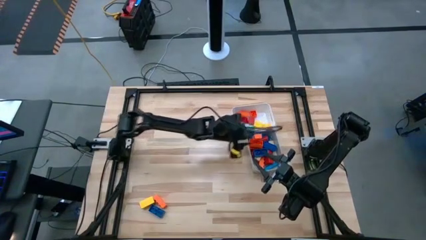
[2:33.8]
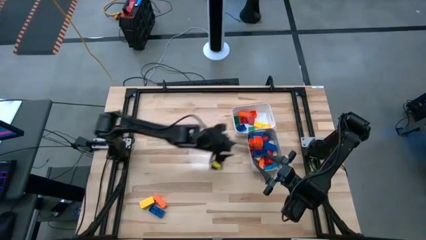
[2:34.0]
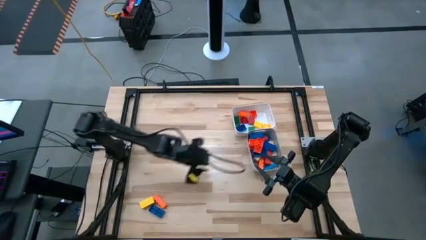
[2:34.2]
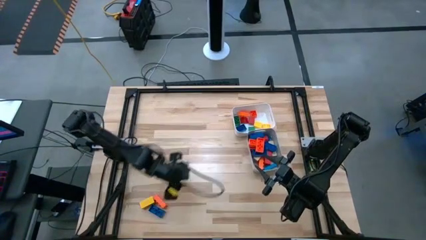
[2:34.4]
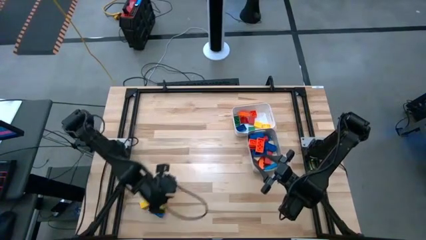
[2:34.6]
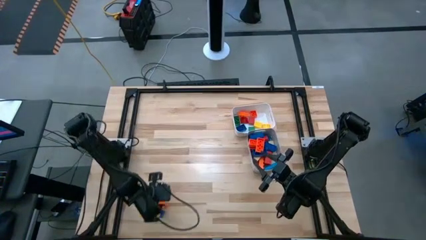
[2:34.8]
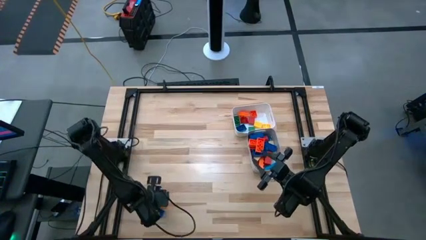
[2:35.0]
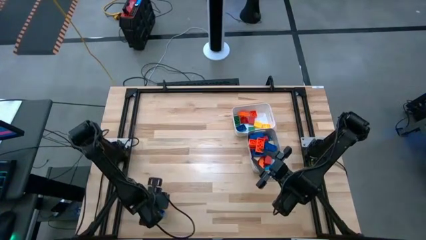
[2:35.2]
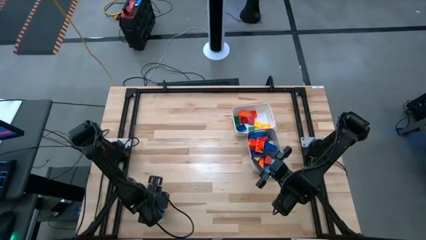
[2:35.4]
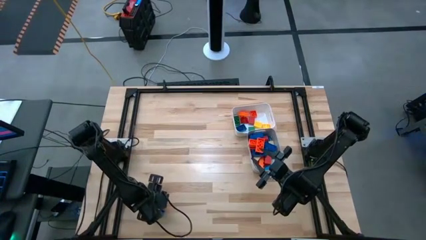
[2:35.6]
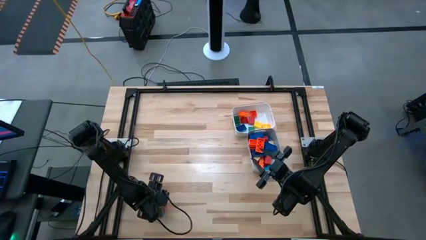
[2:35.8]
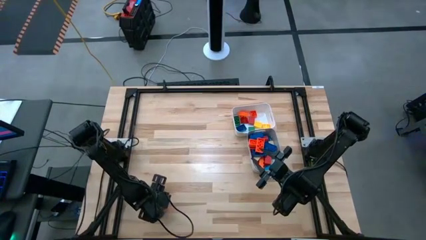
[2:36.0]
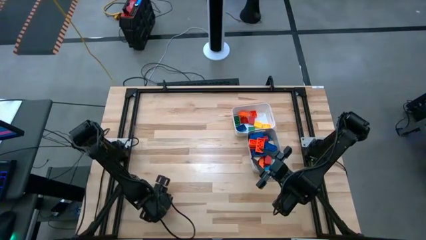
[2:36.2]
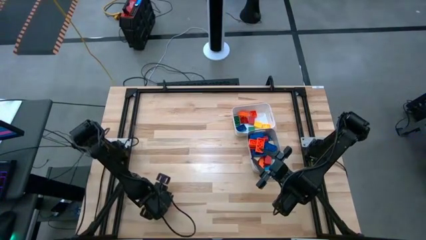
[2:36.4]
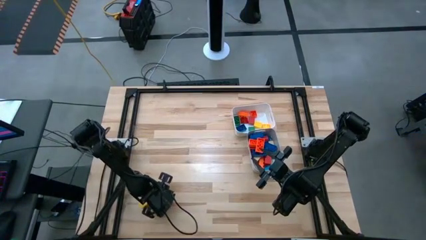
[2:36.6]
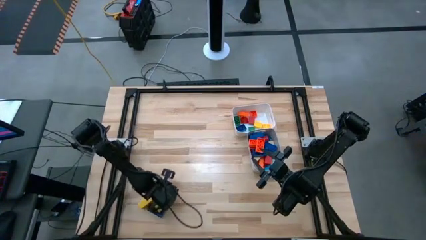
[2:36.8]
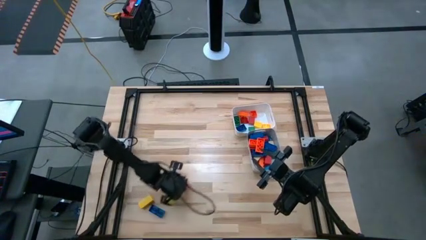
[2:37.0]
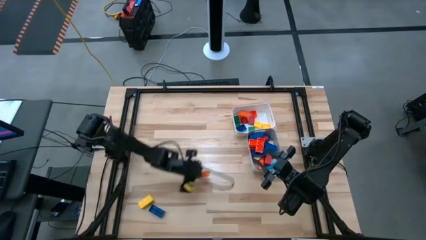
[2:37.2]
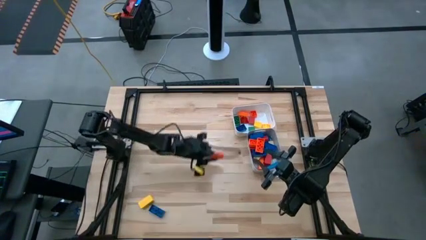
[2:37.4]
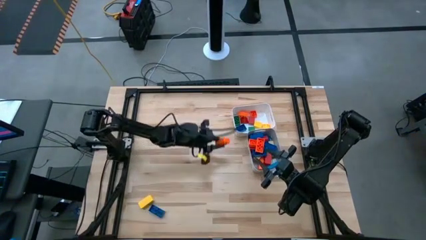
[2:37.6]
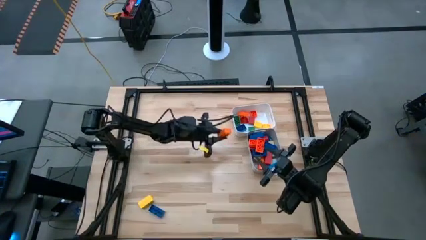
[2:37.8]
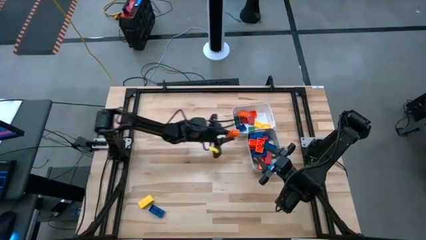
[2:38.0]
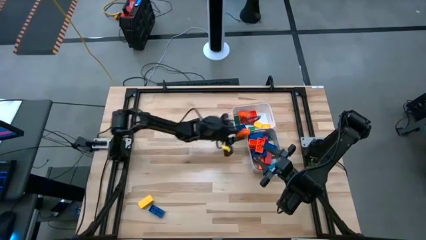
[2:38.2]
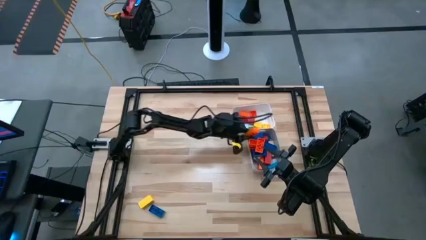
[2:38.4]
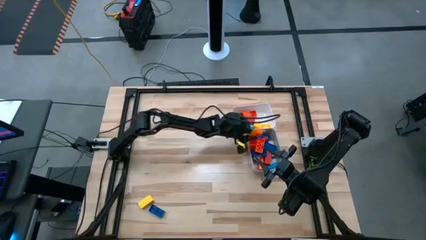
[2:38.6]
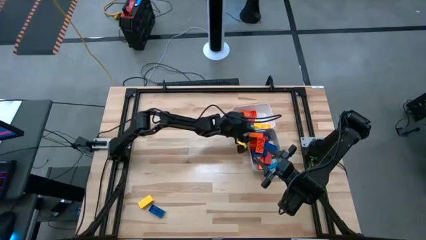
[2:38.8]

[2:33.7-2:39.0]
Task: Sort blocks by size
Put the large orange game piece into the gray bin

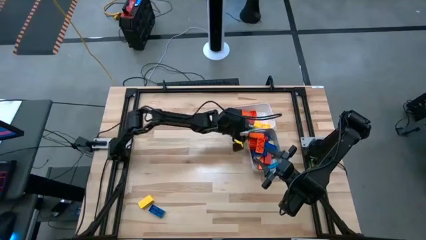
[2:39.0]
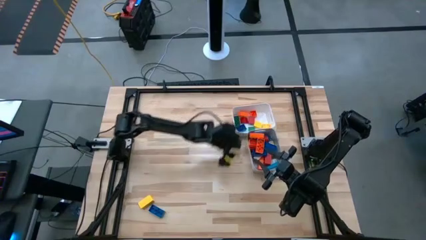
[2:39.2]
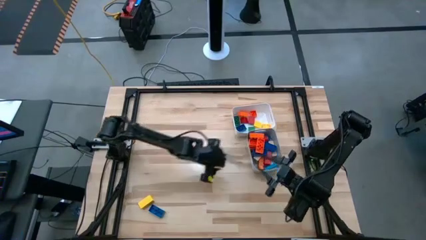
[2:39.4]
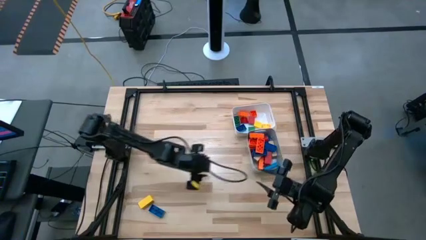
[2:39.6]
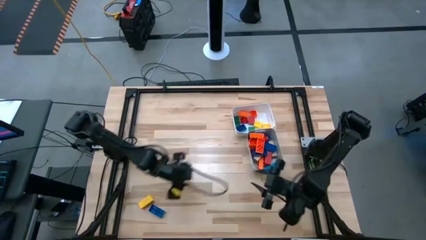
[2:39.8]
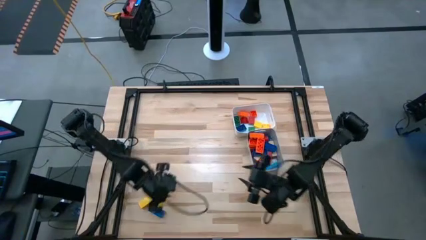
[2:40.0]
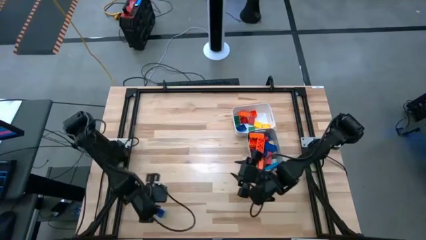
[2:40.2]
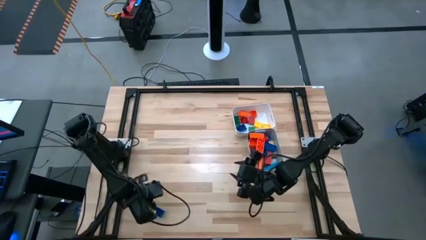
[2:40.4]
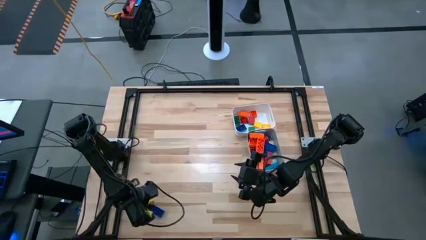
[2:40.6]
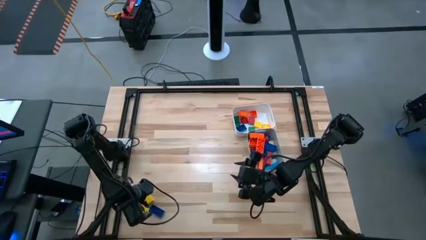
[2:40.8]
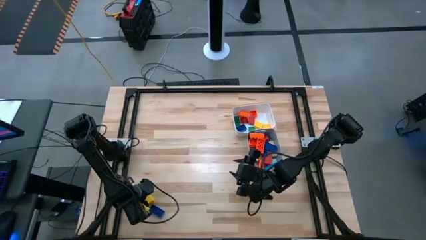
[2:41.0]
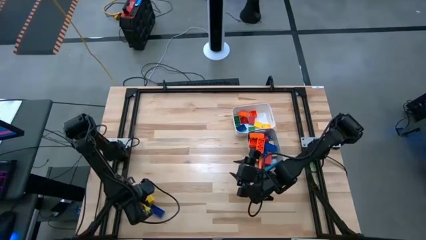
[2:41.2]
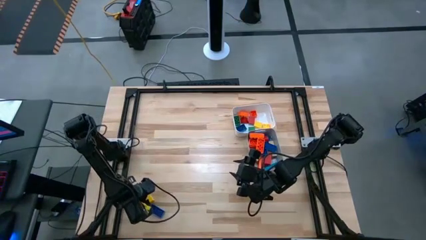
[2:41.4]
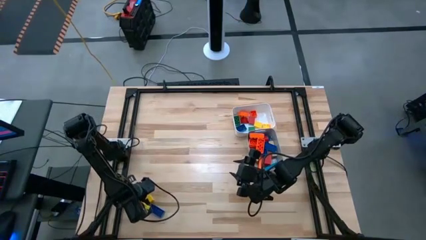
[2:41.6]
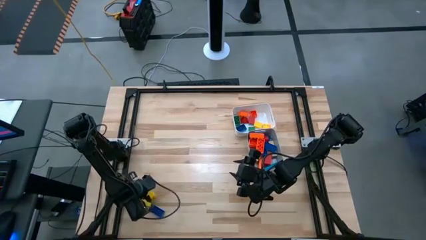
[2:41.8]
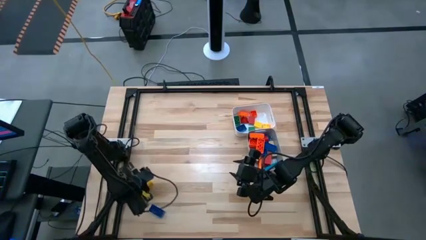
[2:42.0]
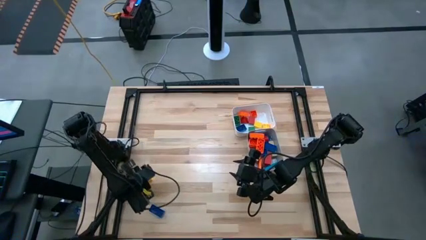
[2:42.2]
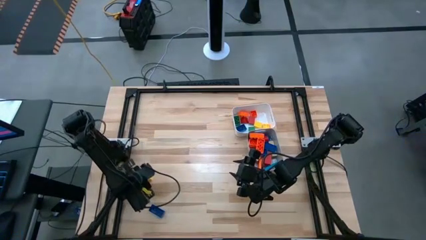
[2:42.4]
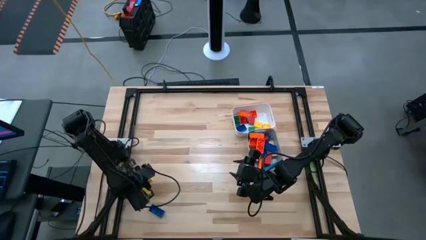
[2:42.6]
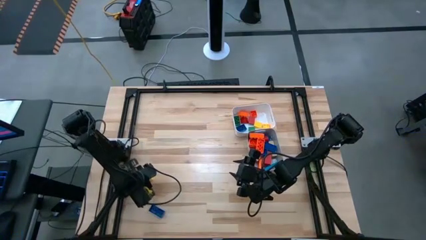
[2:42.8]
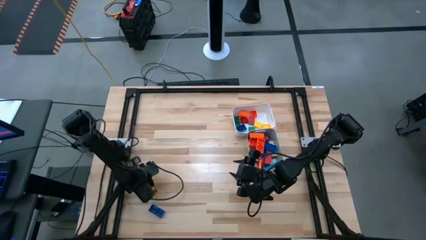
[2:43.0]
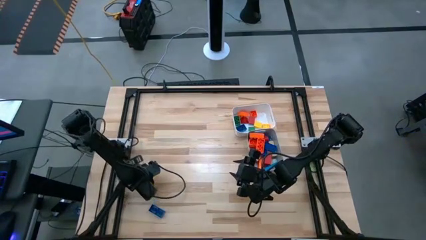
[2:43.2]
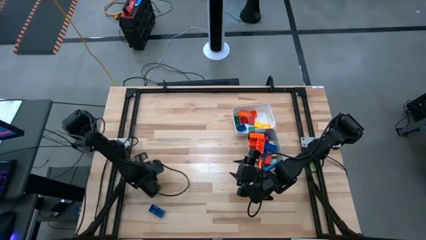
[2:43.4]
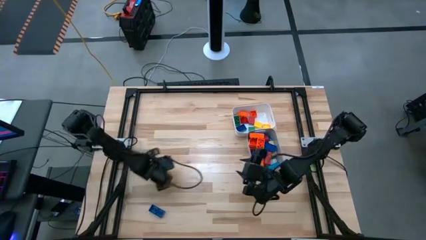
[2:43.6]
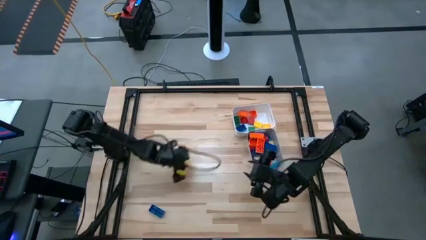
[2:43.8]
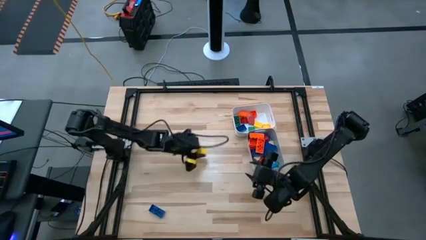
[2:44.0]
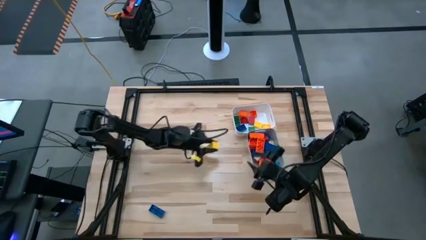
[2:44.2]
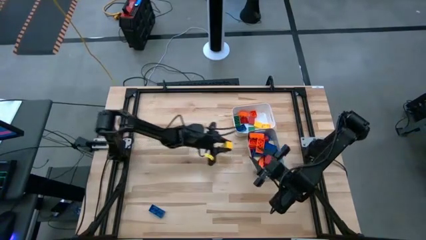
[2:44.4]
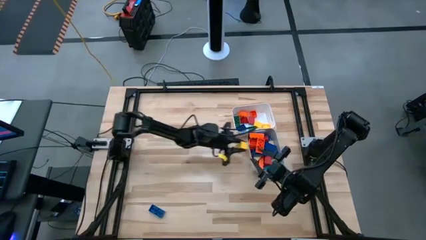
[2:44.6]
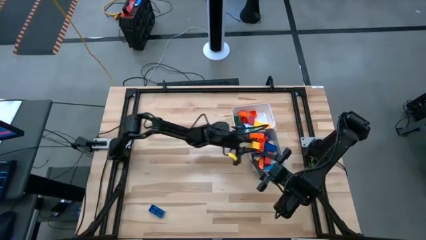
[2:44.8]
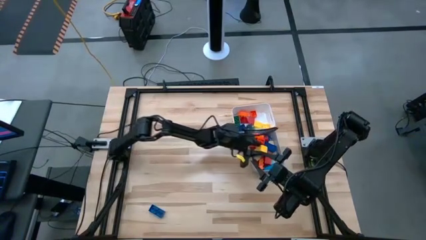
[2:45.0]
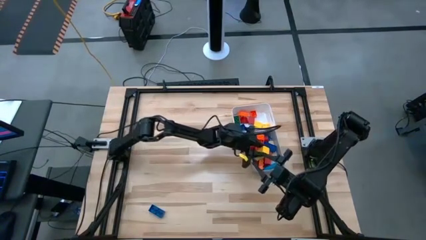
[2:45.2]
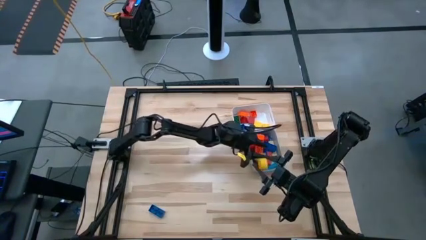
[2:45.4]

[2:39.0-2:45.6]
Put the large yellow wooden block into the gray bin

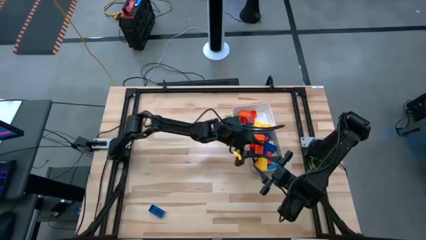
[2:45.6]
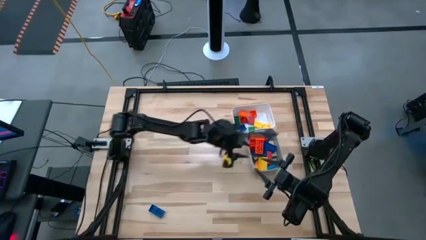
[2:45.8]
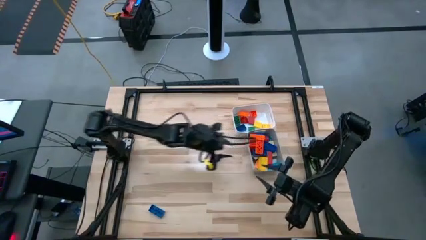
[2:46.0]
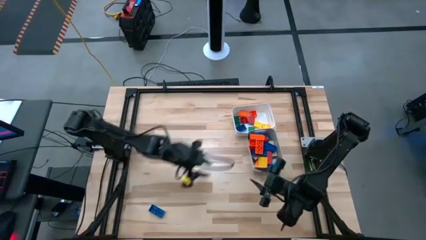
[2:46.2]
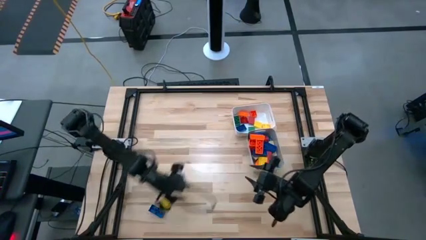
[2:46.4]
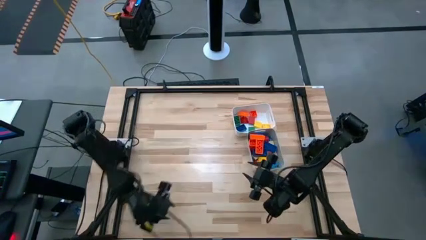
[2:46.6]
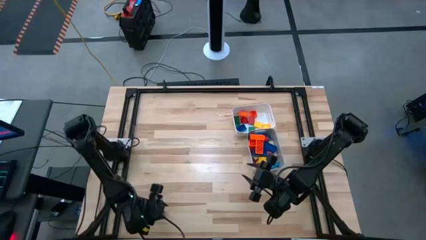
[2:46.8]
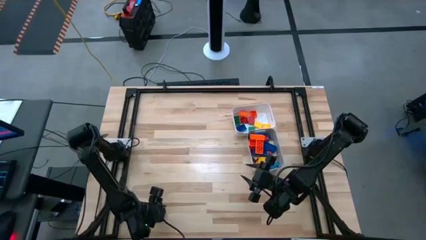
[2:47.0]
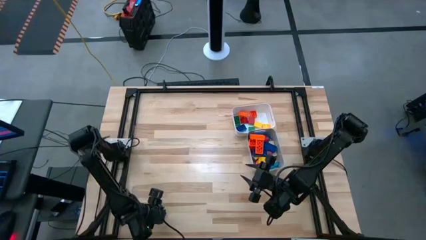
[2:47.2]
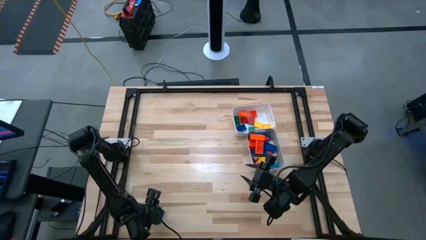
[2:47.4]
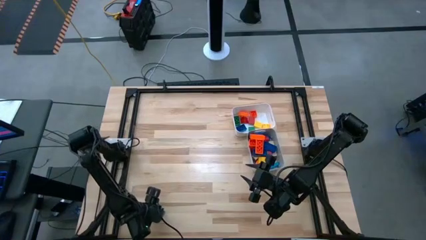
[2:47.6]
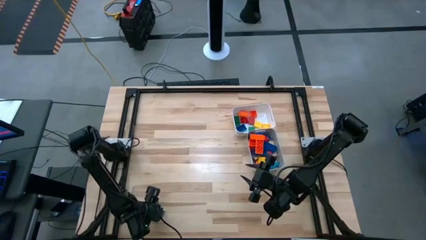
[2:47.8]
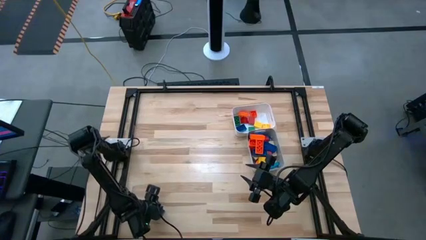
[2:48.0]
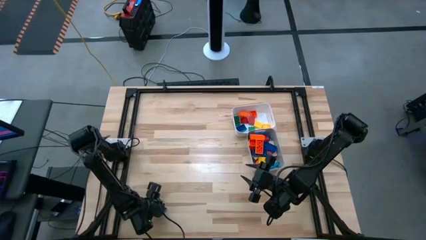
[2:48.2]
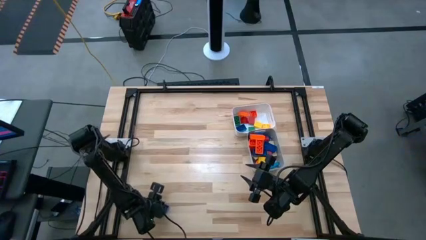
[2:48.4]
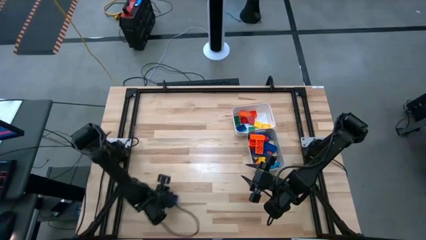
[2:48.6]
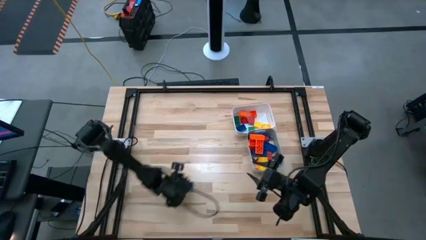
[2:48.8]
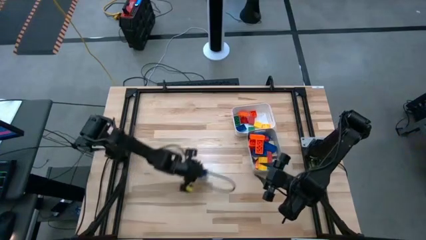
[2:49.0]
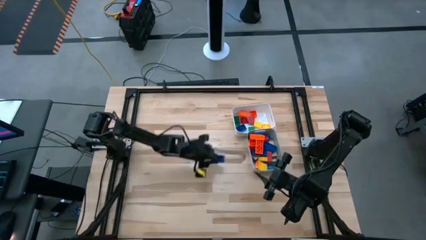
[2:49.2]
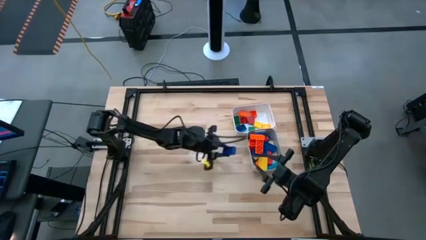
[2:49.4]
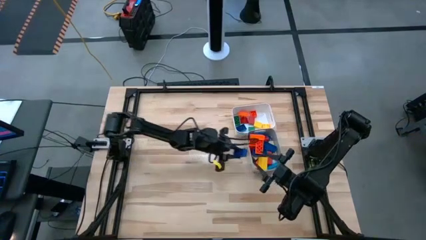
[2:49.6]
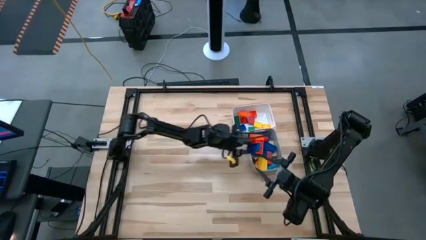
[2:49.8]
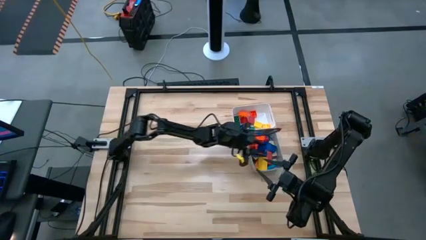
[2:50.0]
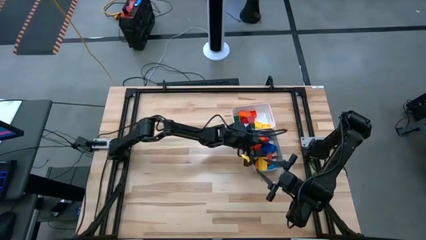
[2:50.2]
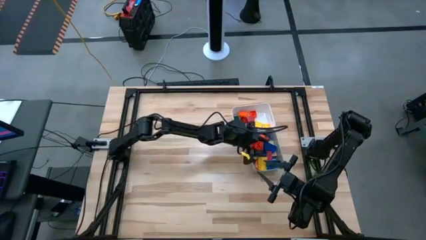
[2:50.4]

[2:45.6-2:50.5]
Put the large blue game piece into the gray bin
